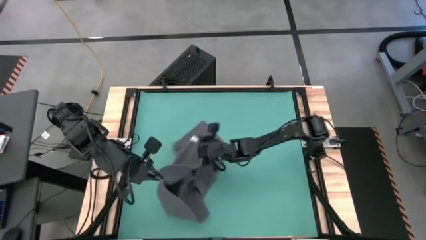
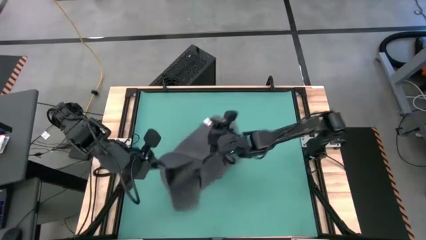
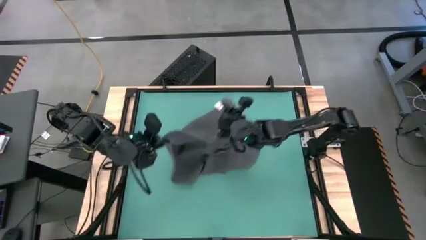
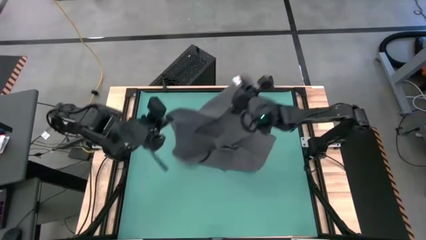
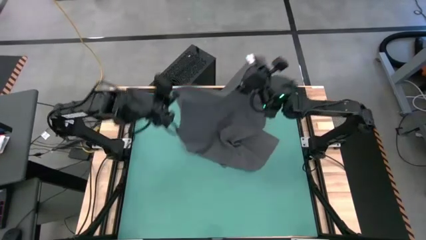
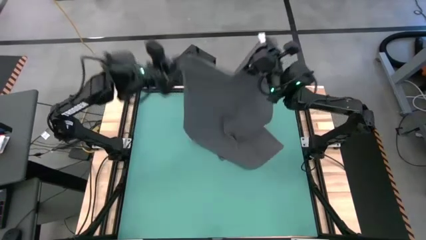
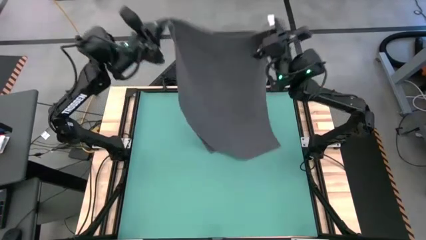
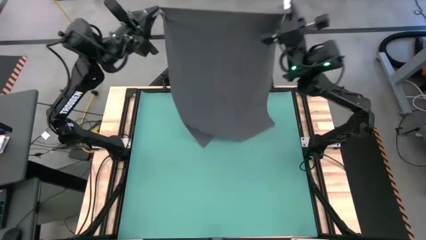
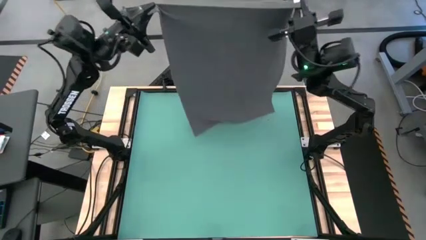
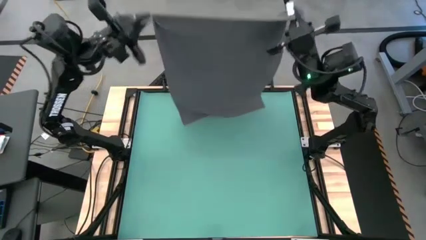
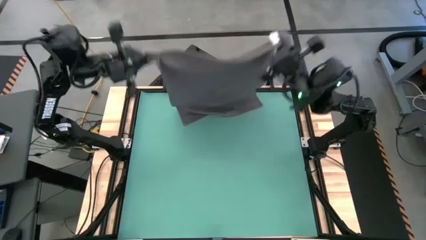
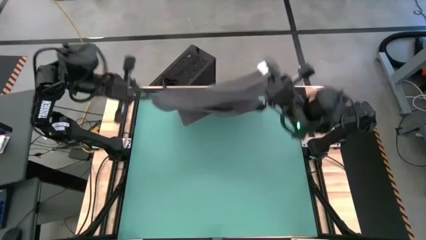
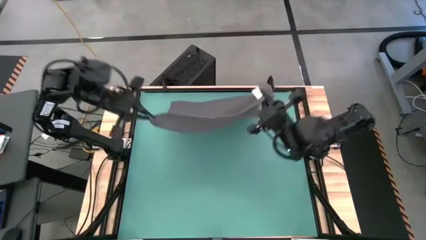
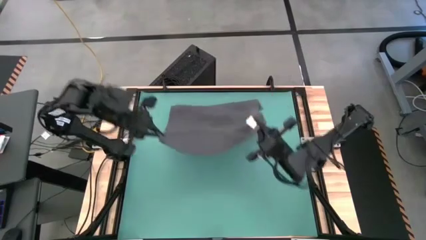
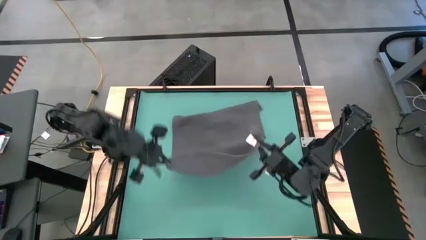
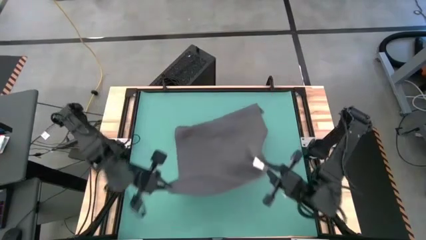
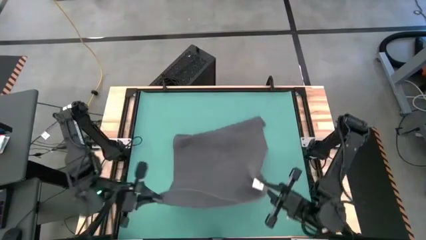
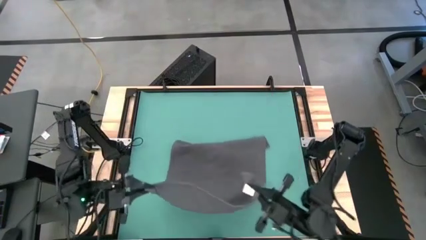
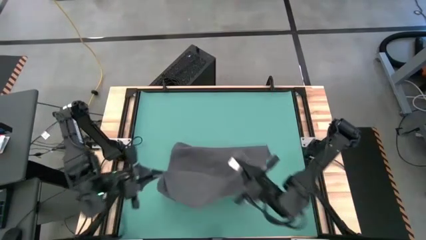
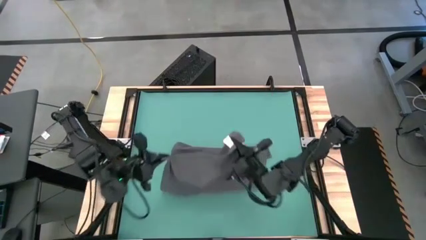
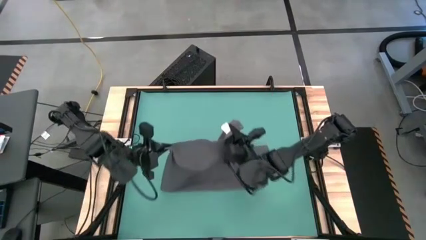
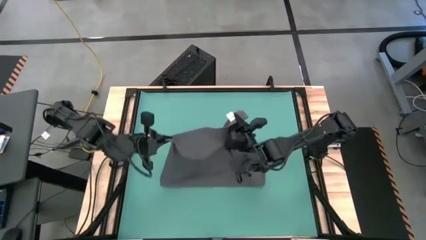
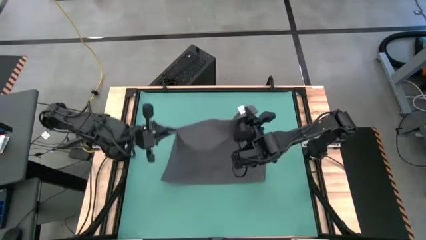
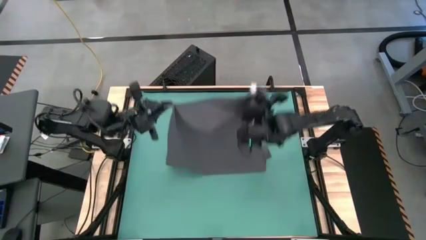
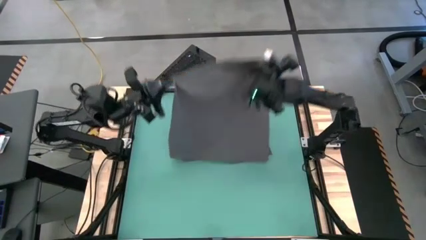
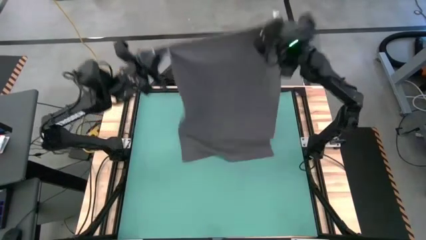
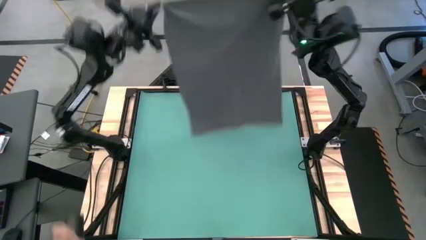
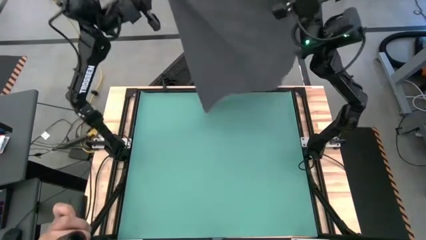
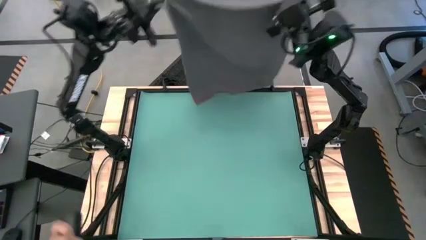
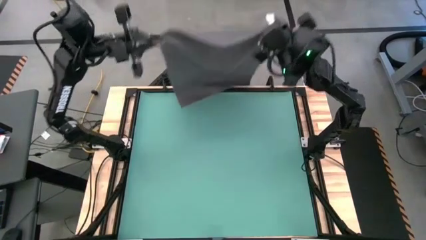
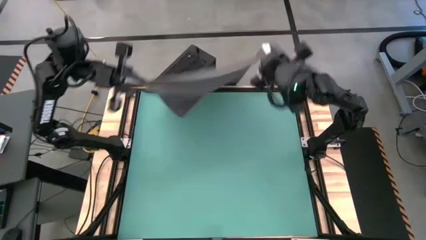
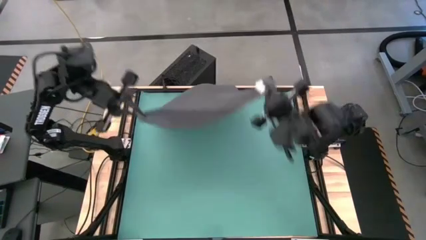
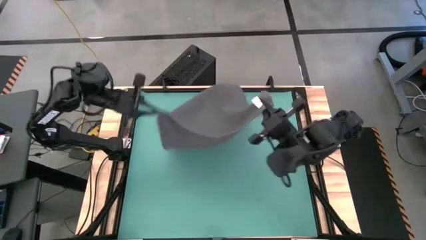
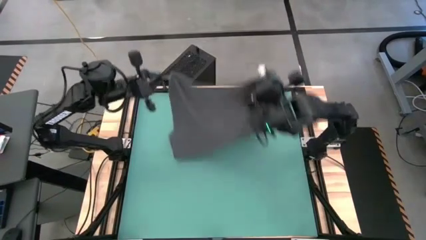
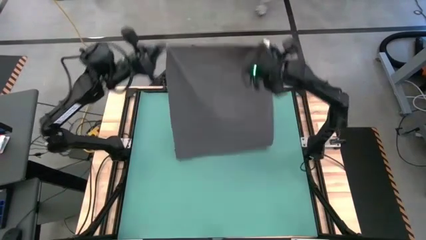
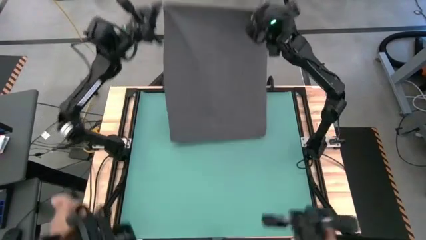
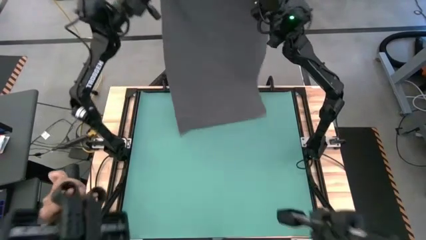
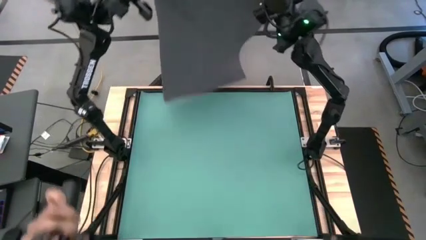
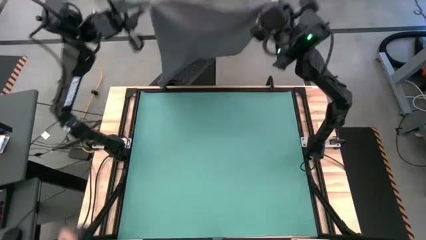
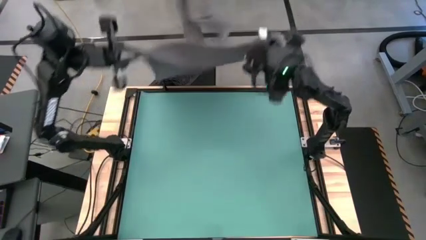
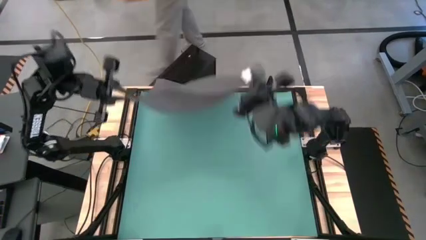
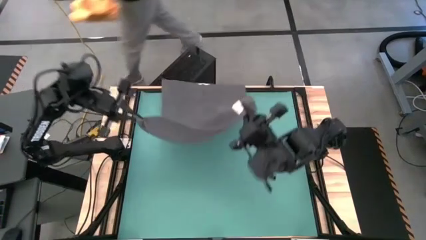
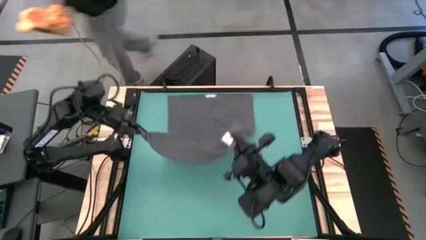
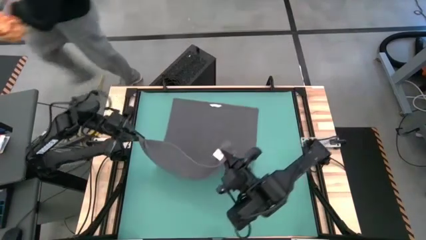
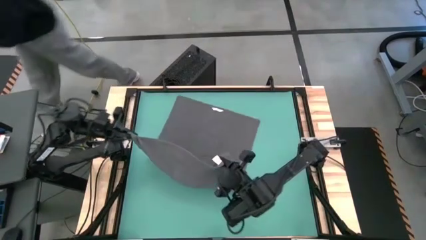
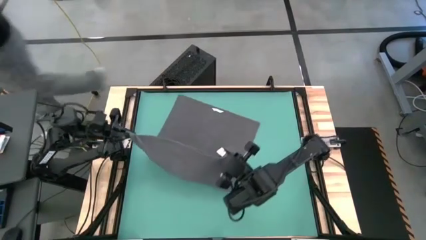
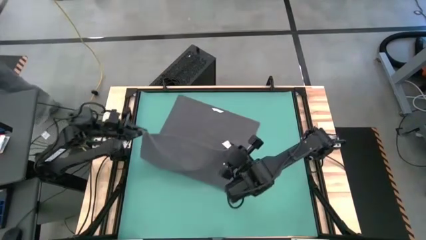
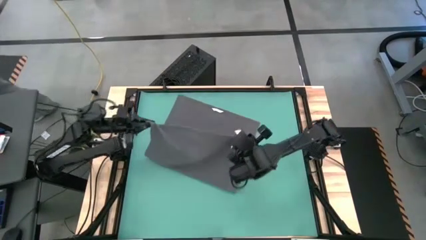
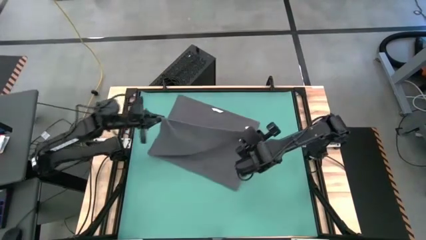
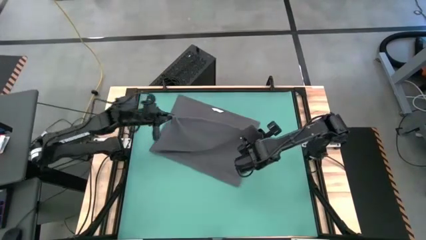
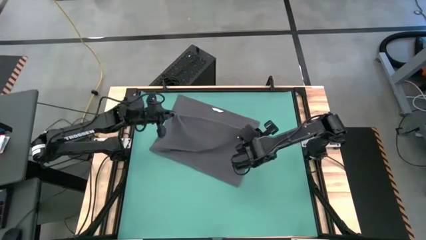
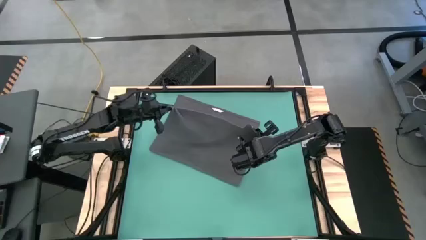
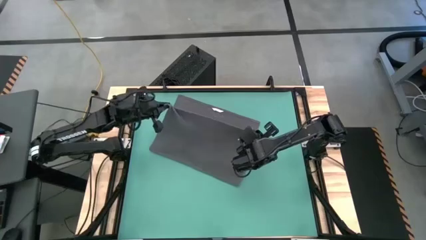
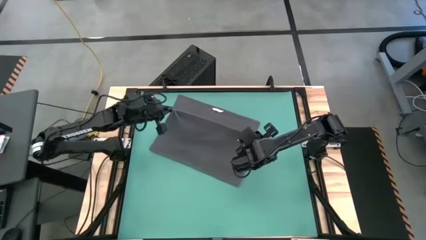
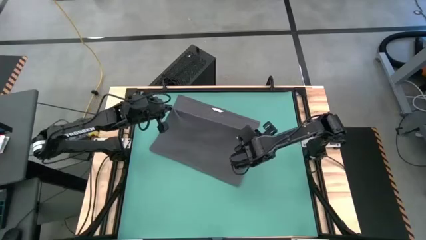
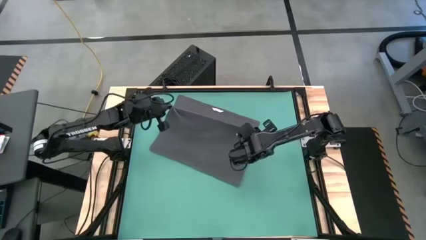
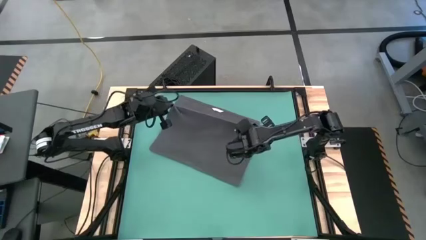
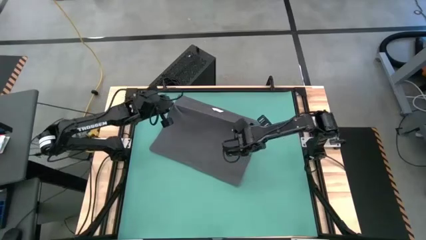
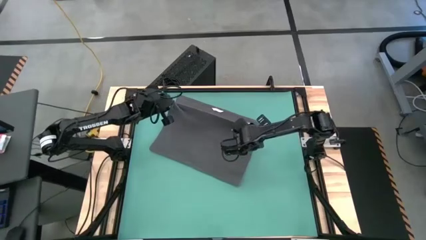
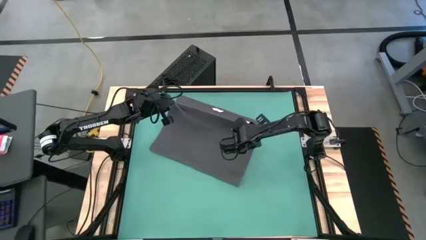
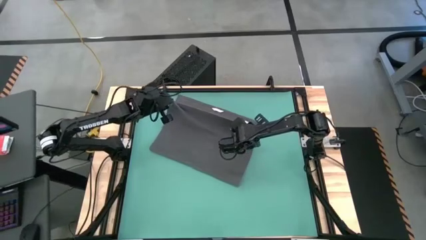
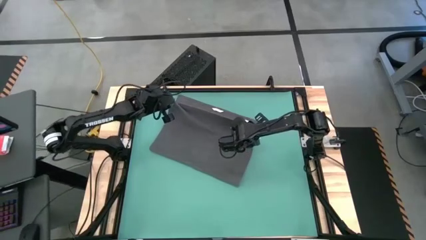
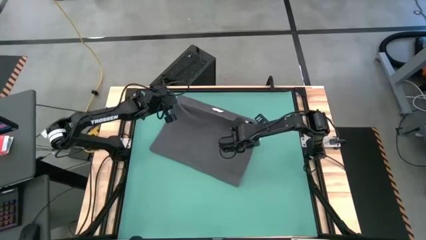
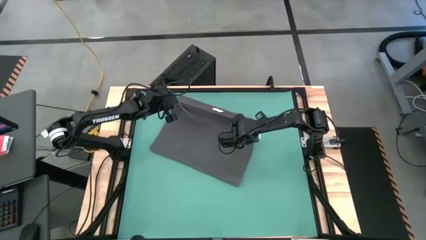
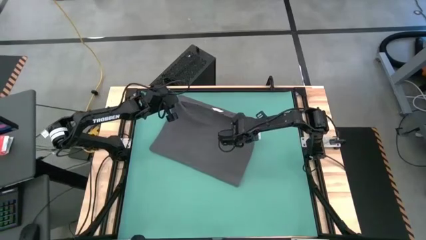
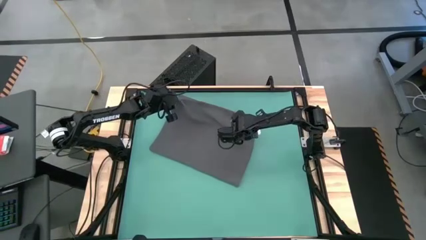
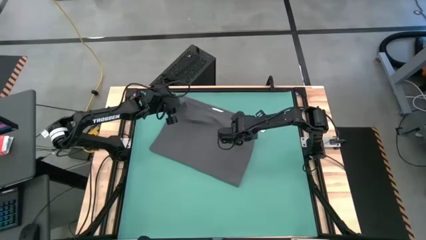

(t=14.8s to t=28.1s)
Task: Roll towel
Prepare the gray towel for folding

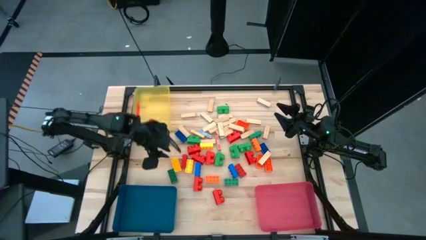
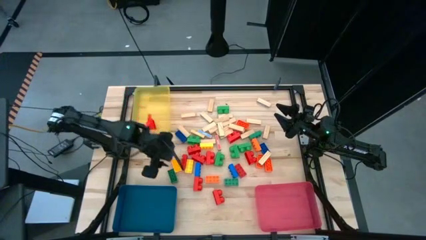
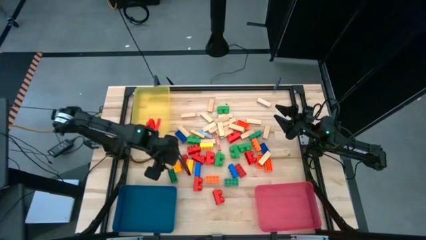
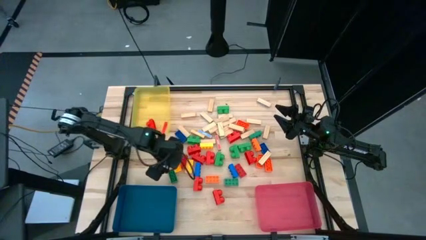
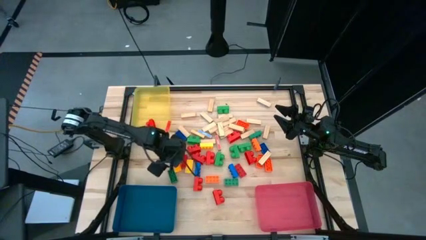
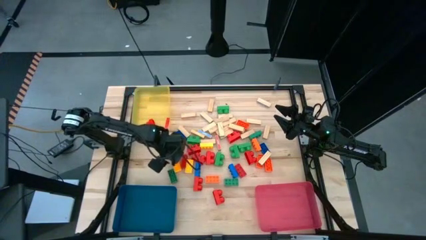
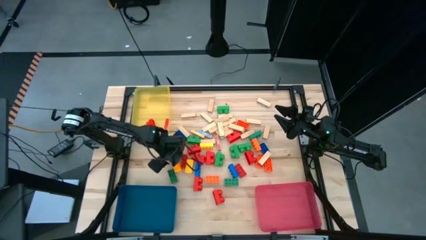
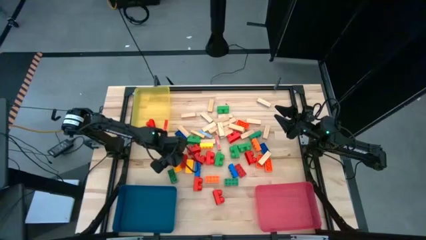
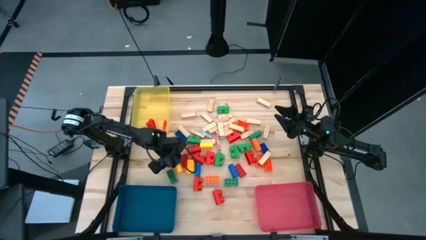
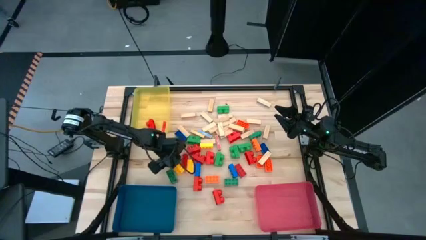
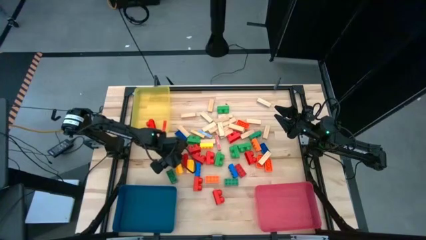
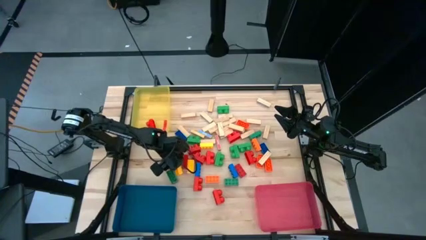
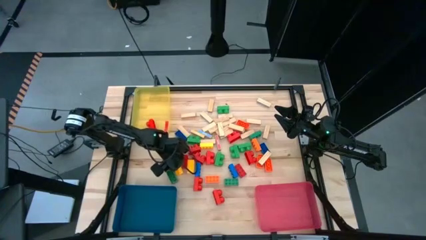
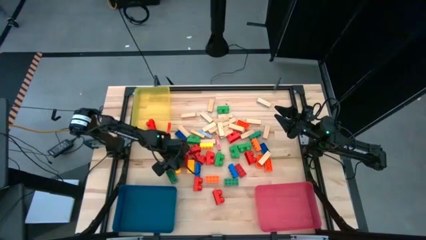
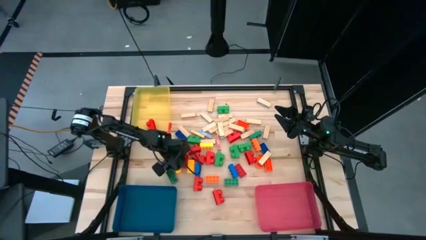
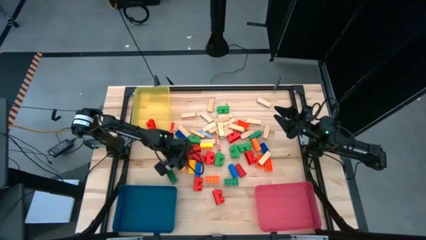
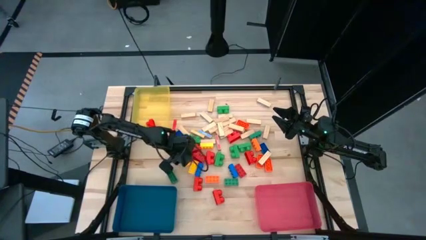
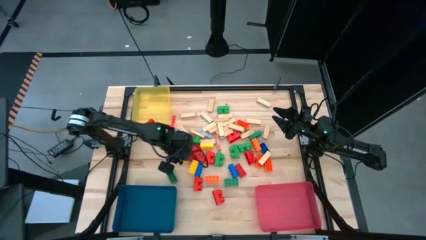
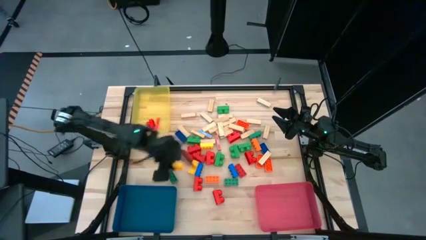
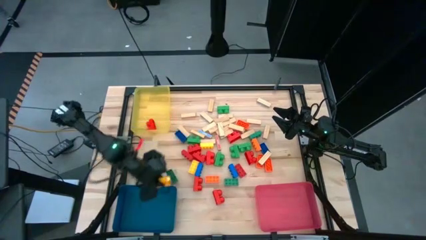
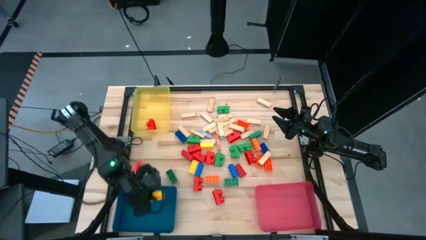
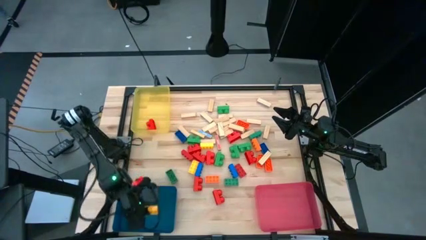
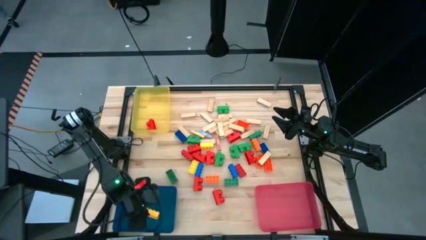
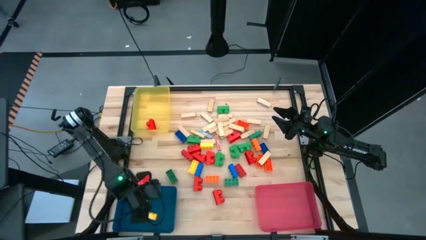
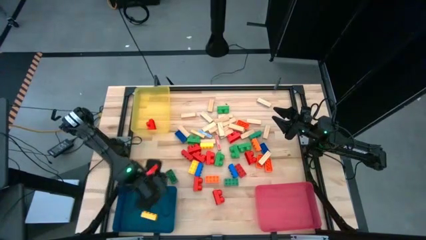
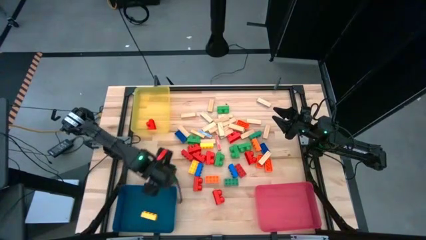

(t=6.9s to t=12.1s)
Task: Sort blocks by size
Put the yellow game piece into the blue bin
